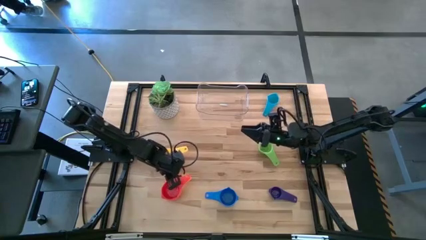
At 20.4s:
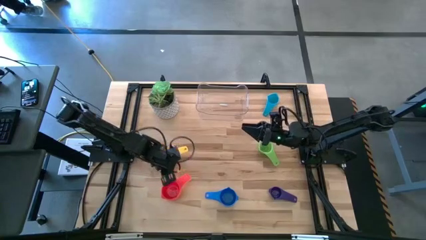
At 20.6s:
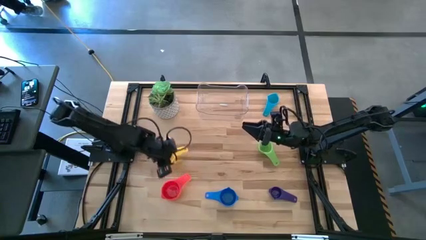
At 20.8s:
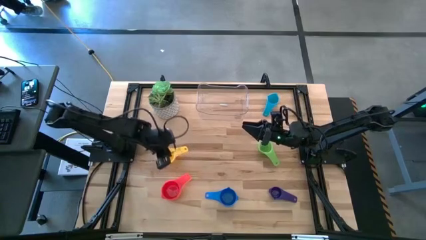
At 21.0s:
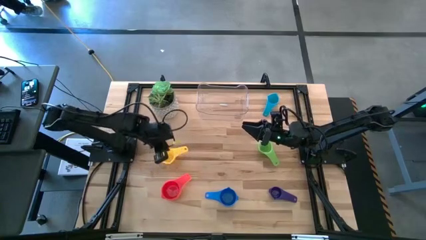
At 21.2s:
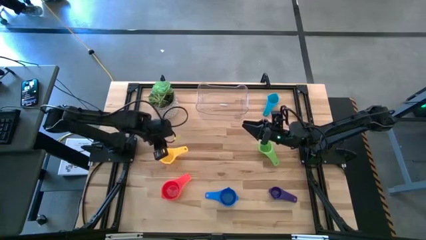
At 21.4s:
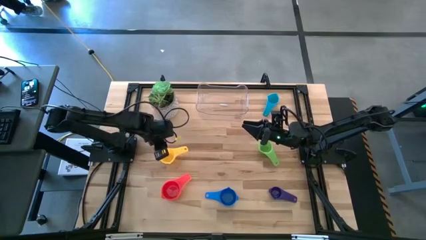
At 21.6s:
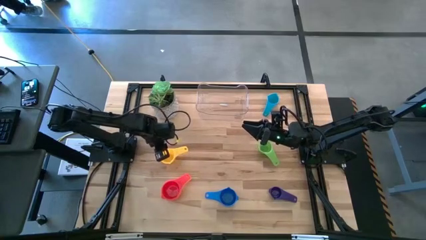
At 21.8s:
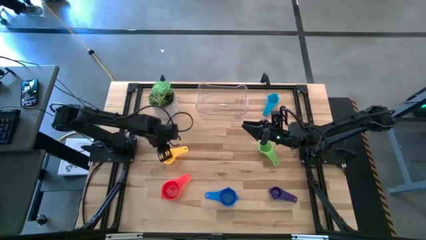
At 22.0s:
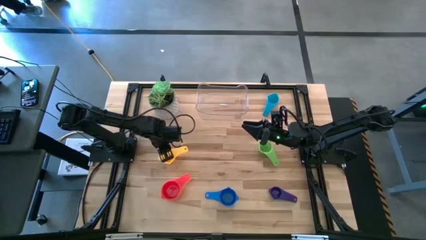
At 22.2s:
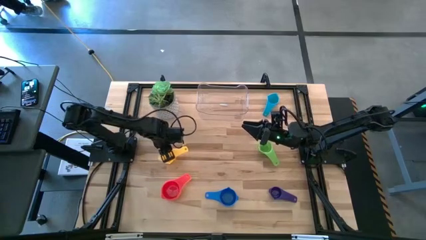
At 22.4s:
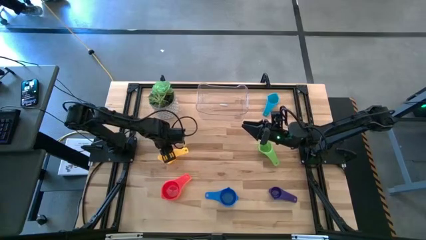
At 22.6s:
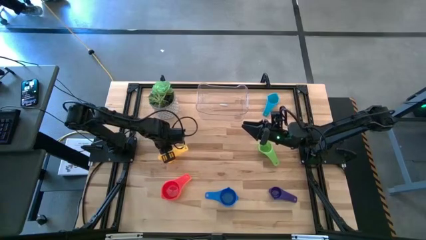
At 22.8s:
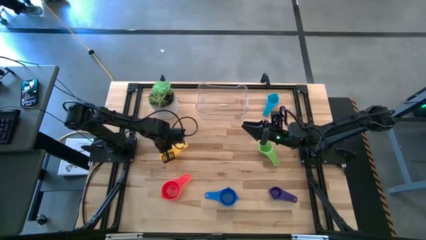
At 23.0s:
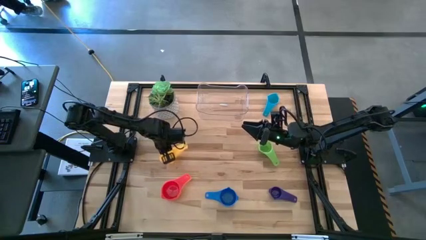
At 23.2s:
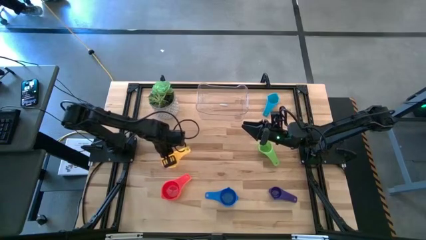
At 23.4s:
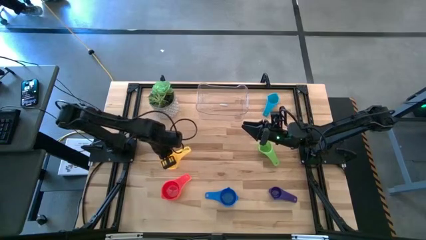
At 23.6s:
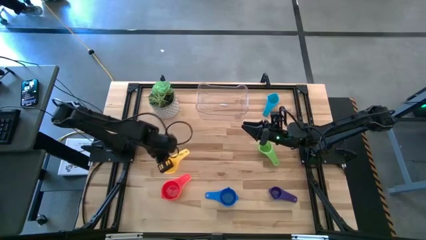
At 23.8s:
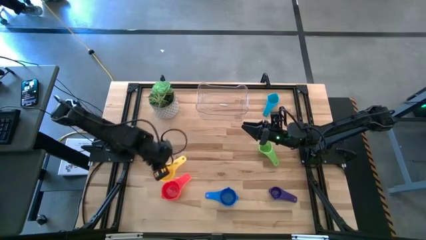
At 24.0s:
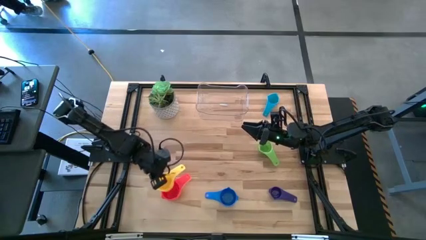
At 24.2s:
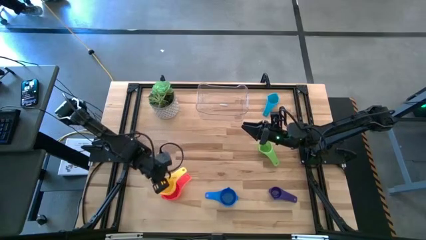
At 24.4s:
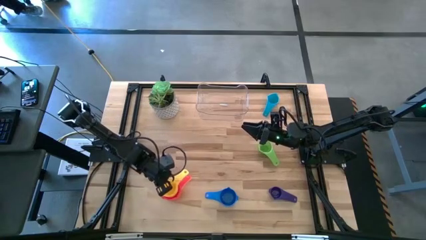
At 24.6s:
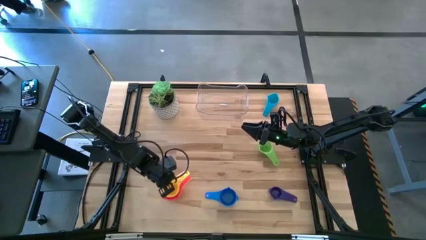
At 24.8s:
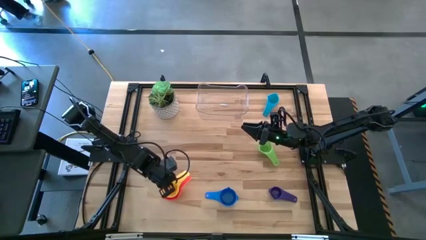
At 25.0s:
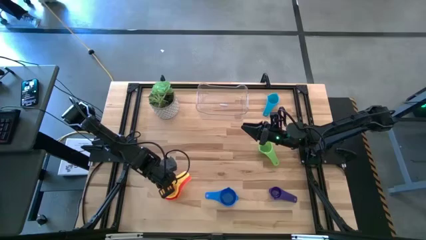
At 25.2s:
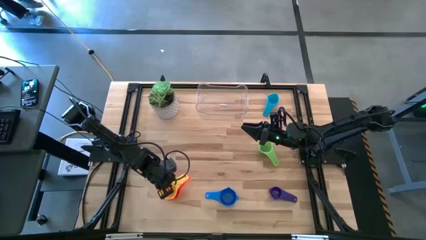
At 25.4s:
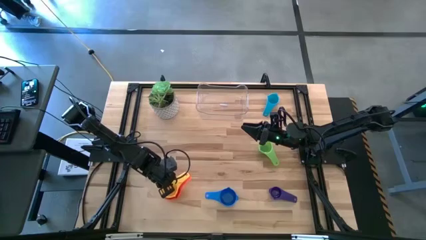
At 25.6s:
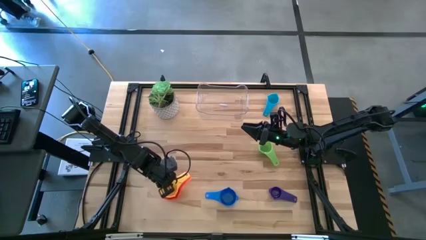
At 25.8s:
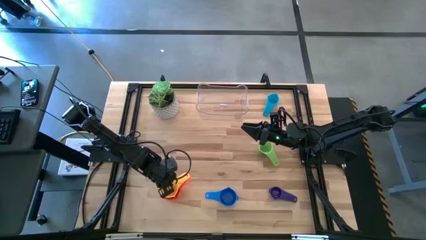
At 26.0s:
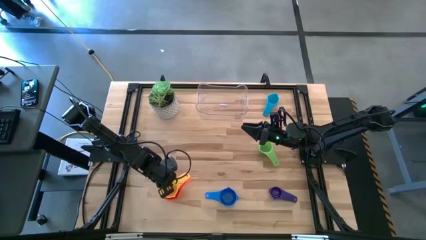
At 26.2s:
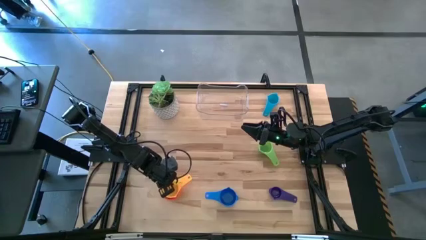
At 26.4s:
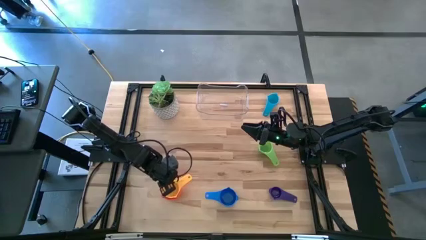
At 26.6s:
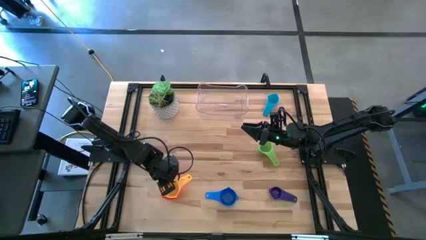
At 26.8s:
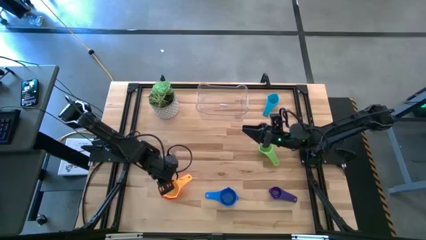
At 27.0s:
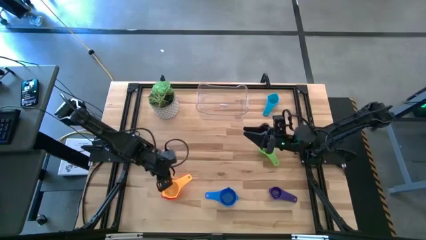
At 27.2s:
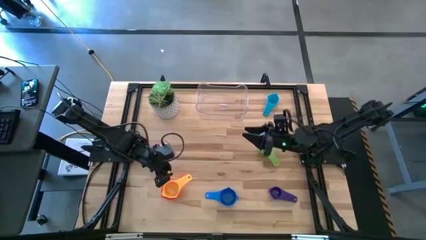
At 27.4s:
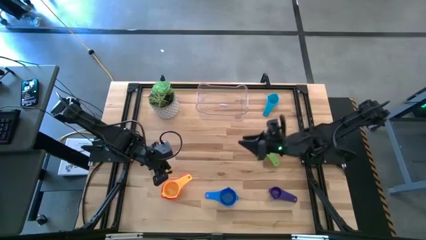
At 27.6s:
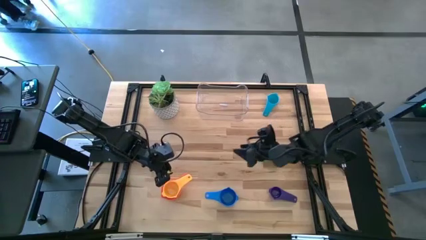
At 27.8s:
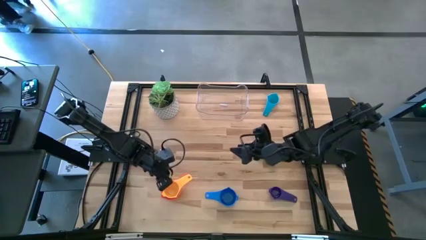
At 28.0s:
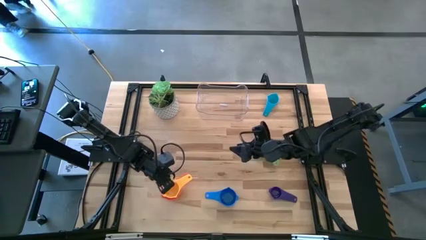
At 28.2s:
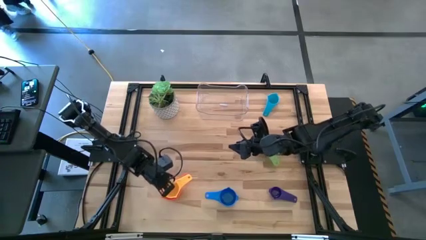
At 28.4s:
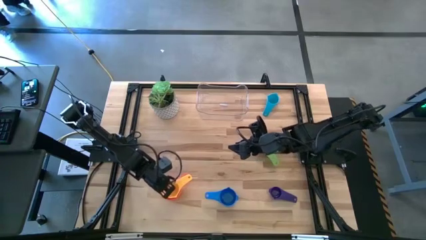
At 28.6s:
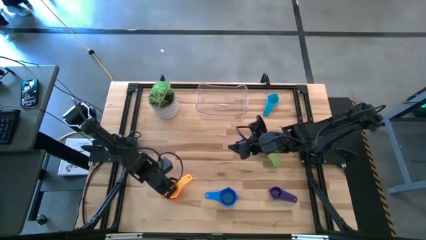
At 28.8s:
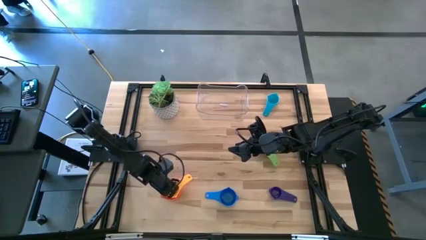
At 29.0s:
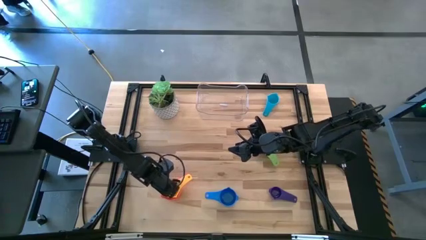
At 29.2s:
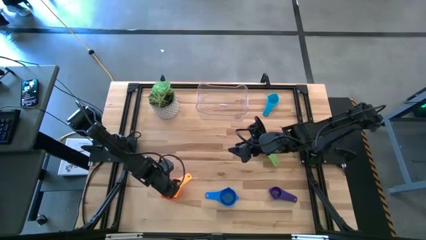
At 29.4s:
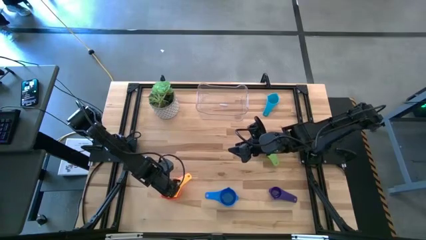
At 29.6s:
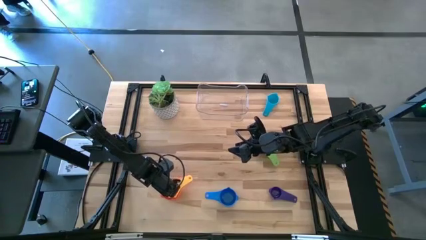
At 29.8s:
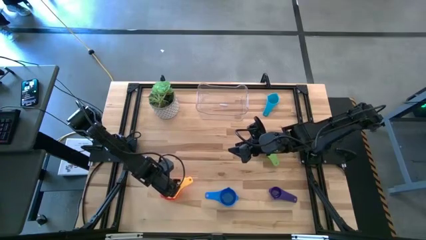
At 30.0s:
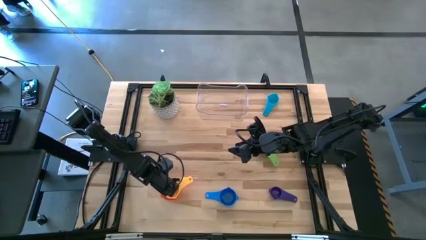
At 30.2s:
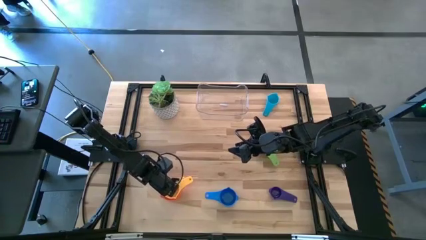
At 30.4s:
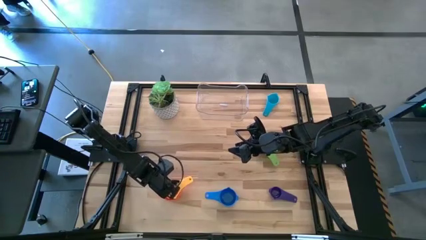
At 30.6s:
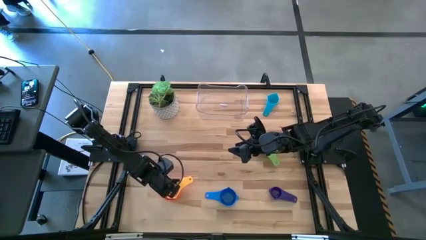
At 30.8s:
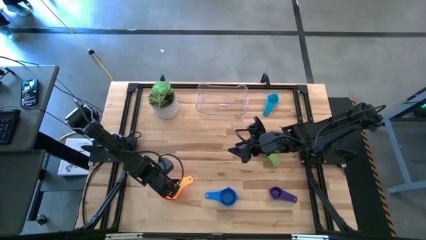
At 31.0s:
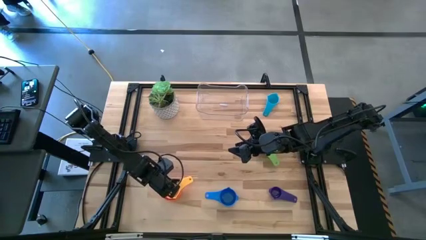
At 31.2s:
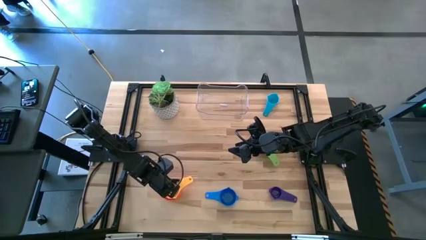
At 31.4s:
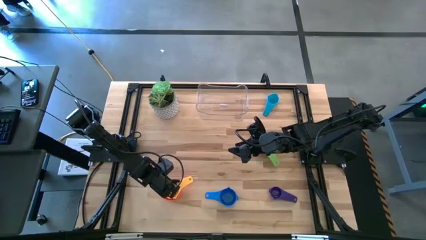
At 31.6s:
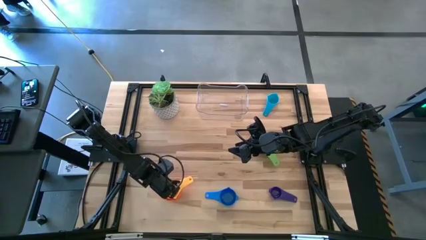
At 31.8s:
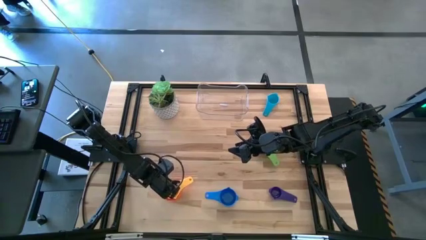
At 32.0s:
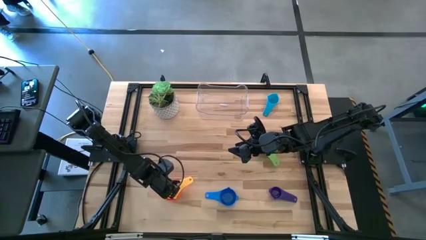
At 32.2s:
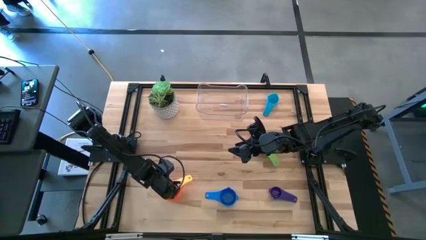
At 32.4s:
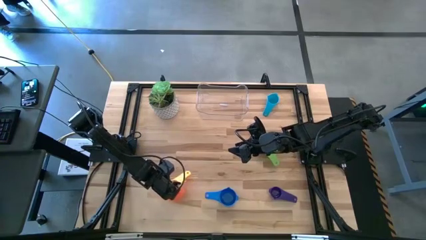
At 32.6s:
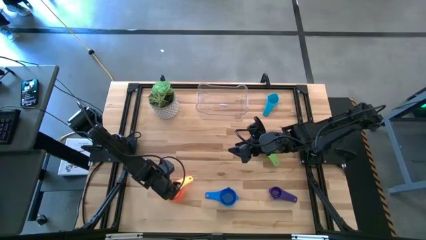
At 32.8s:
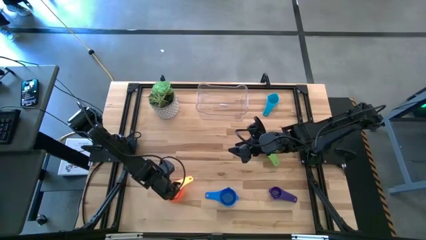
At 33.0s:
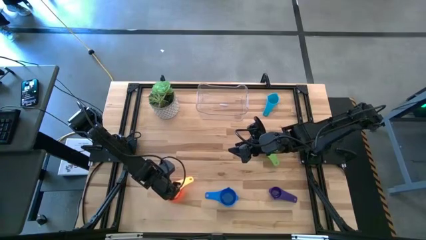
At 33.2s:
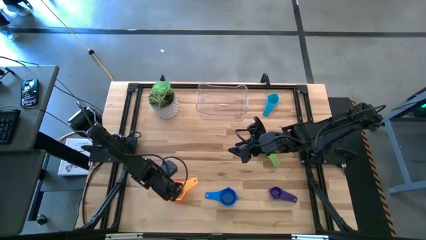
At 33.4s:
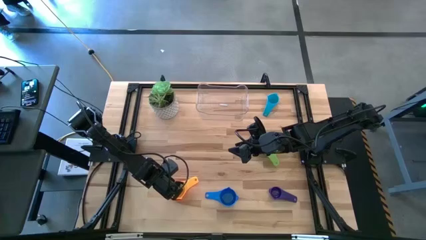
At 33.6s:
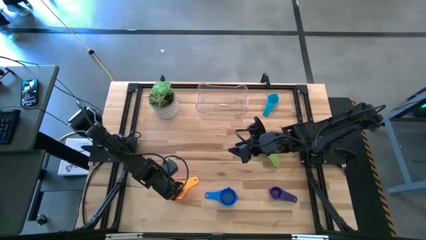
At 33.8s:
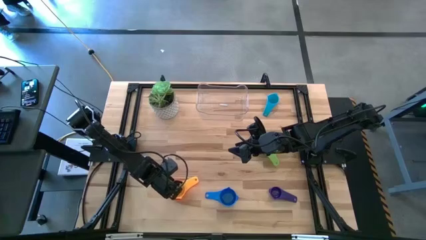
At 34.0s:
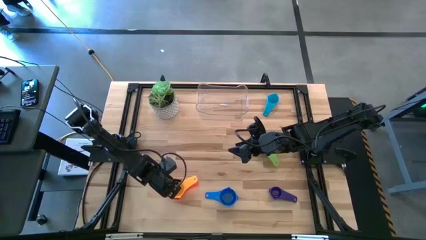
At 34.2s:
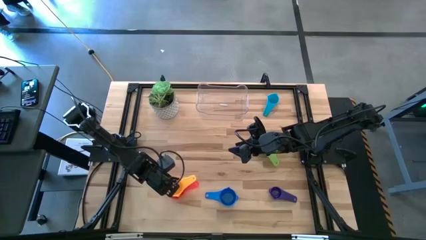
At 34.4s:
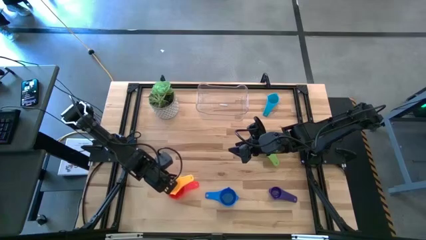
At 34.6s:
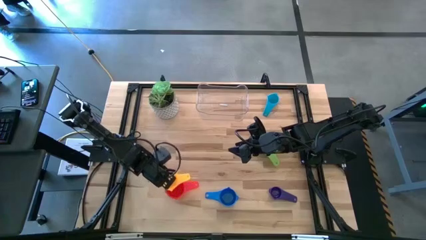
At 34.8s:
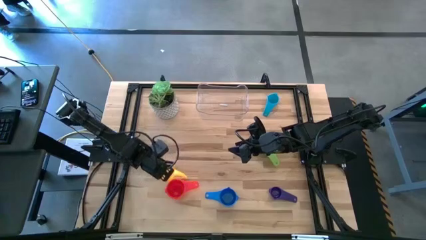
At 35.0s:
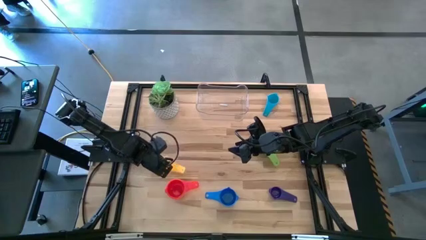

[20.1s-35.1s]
Task: Nest measuring cups in basket
Stack the yellow measuring cup on top of the red measuring cup

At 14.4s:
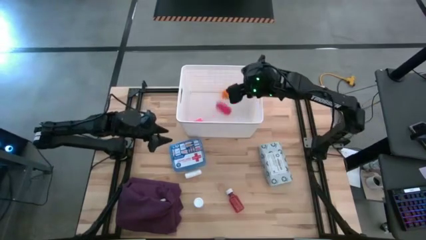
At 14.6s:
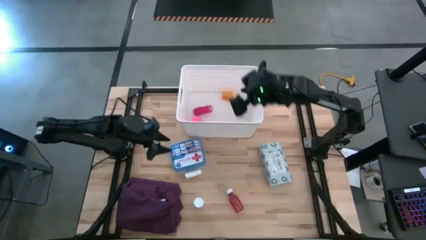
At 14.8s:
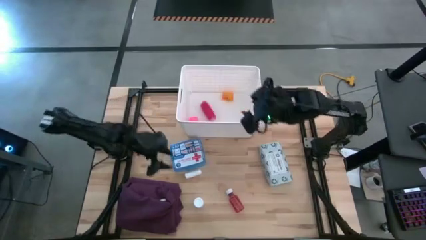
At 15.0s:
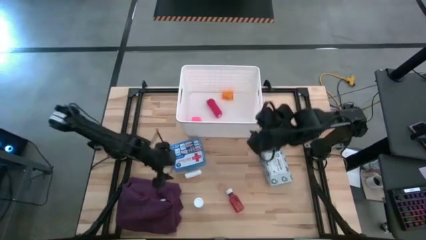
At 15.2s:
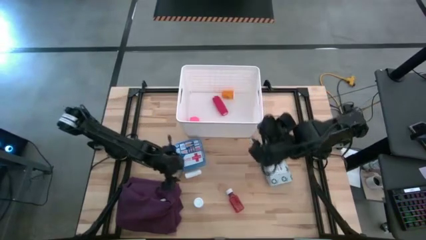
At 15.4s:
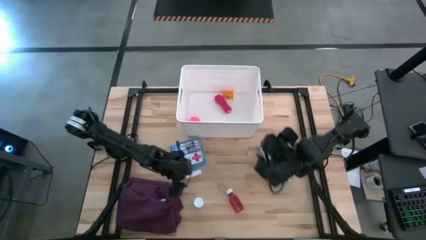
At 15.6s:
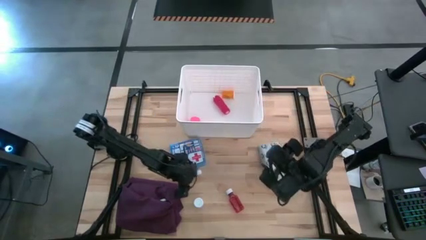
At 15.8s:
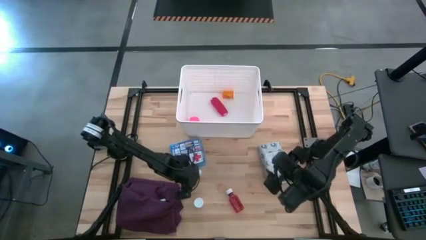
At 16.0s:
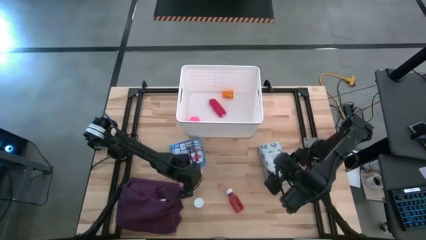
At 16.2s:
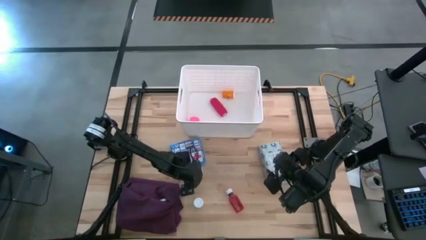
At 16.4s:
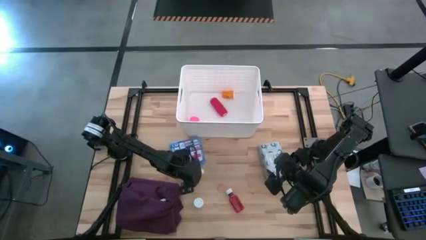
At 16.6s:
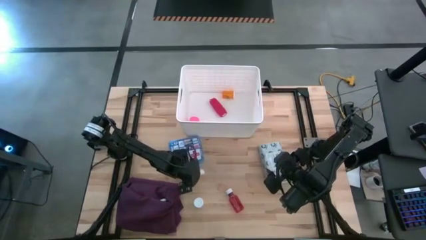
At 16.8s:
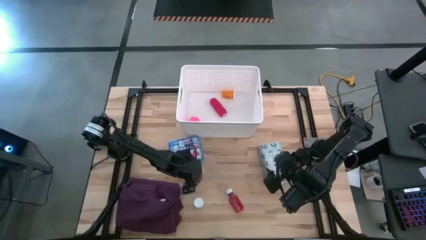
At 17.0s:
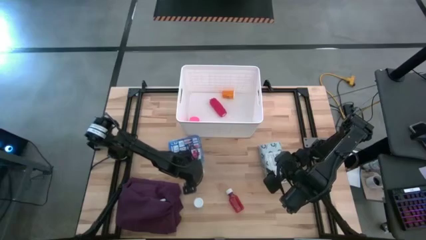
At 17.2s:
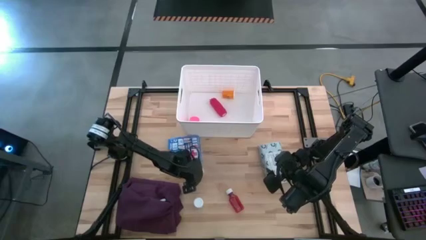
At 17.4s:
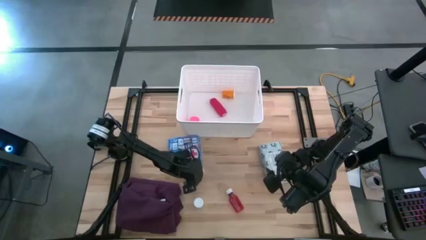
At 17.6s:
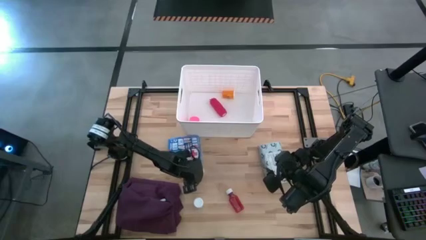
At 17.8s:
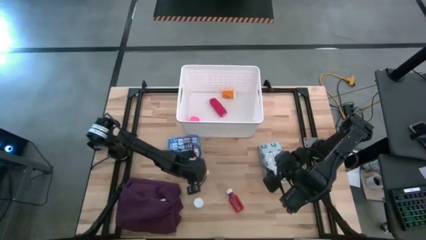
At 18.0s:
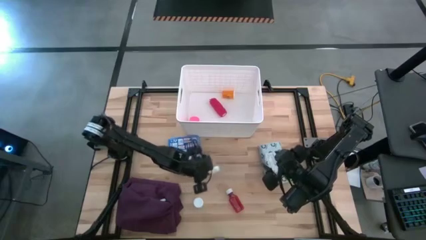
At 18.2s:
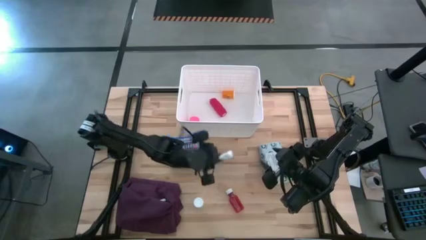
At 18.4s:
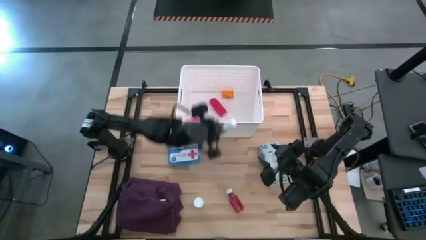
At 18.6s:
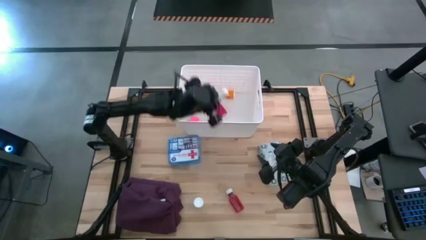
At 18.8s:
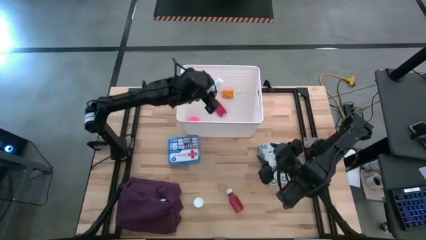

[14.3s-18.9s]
Task: Pick & place medical supplies in basket/bin
Put the white rolled gauze into the white bin
